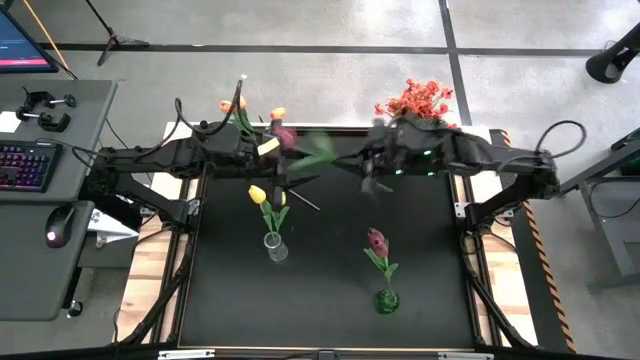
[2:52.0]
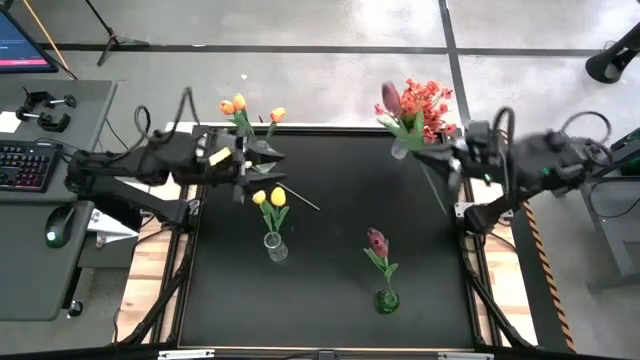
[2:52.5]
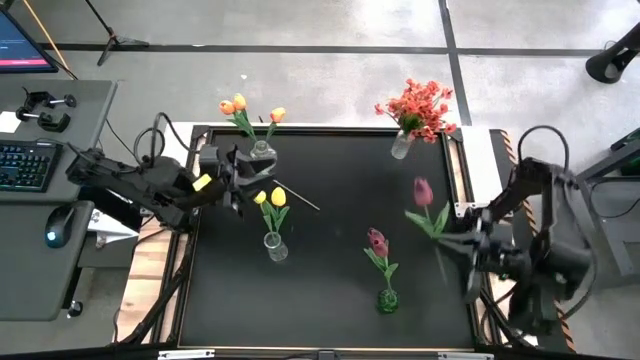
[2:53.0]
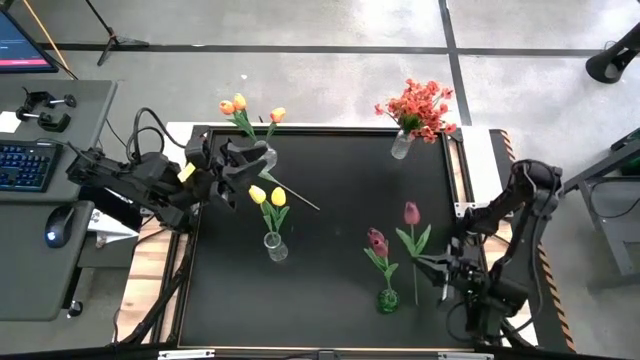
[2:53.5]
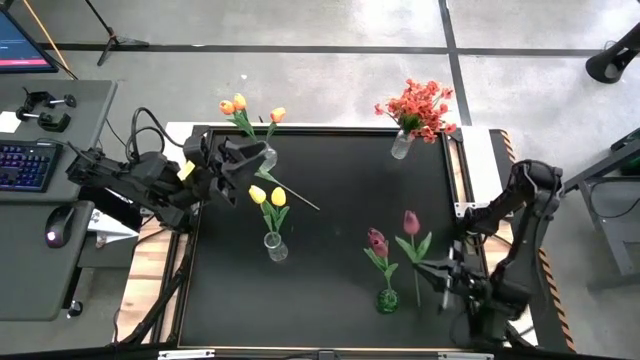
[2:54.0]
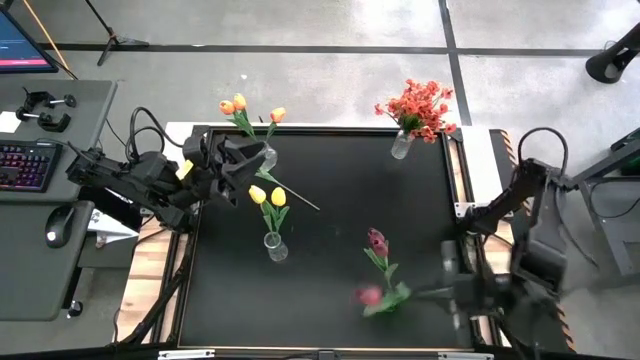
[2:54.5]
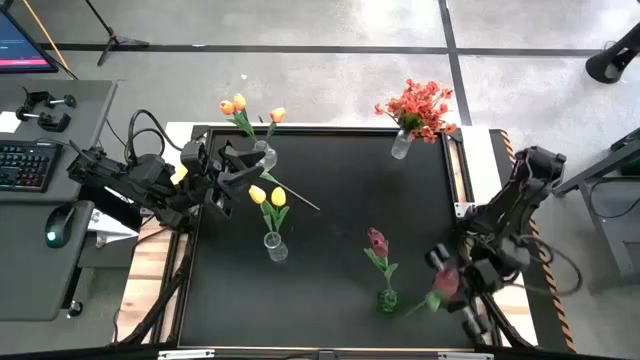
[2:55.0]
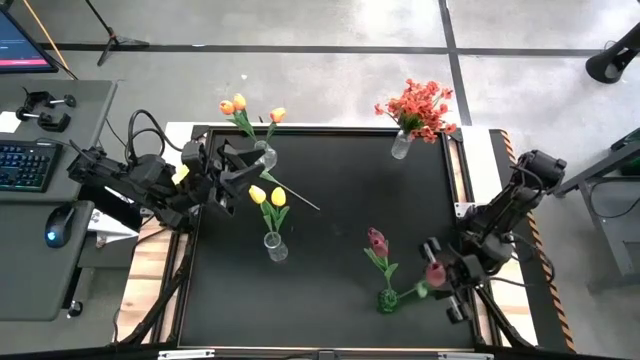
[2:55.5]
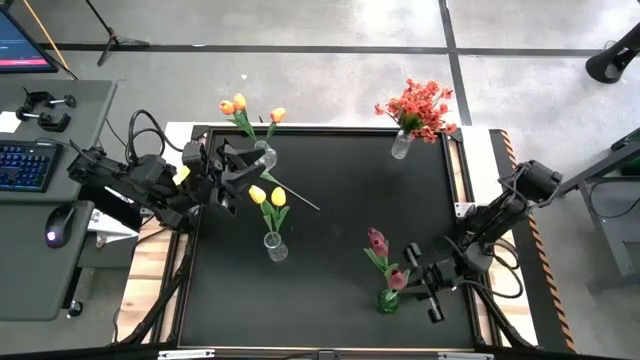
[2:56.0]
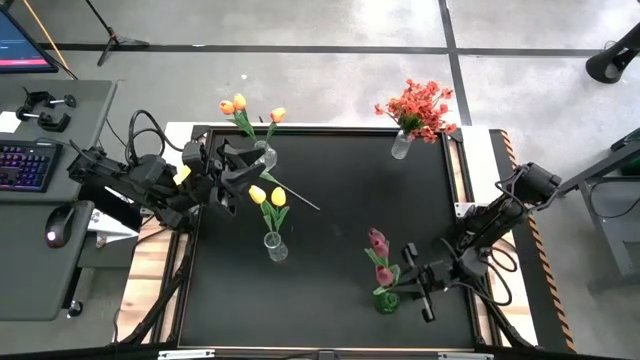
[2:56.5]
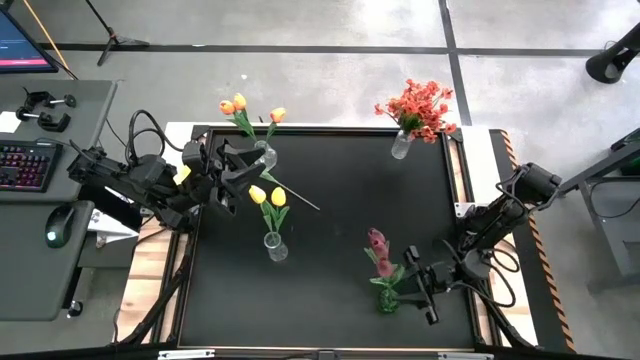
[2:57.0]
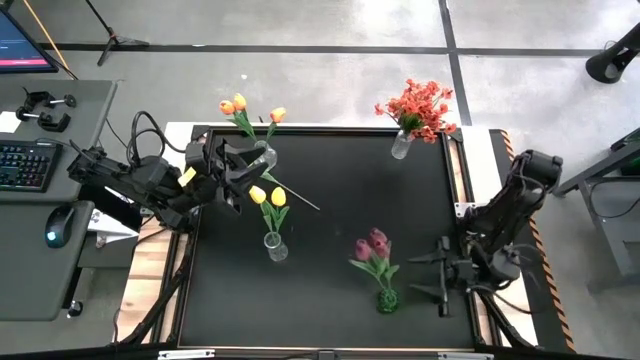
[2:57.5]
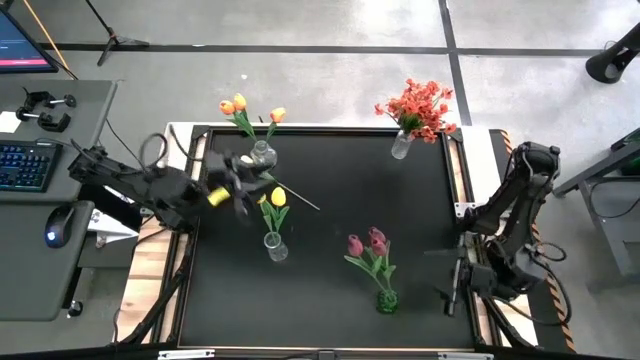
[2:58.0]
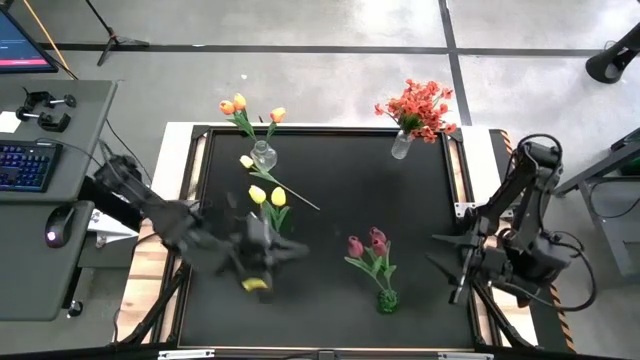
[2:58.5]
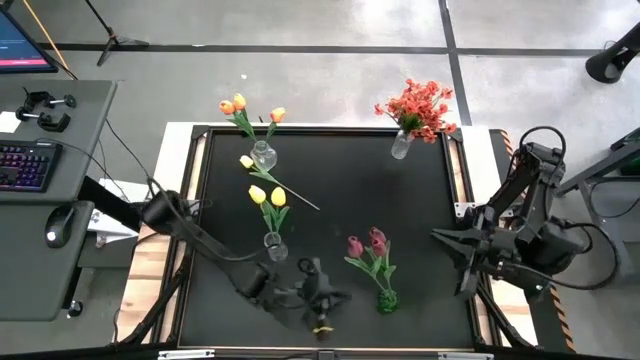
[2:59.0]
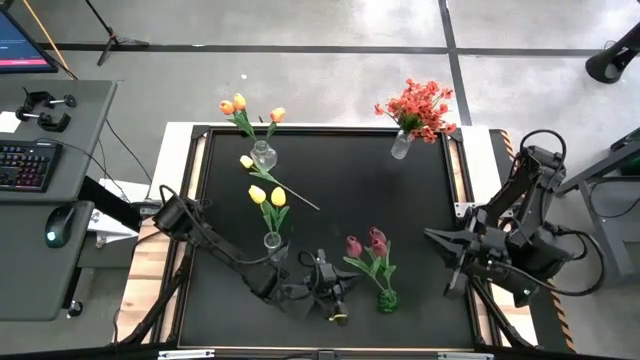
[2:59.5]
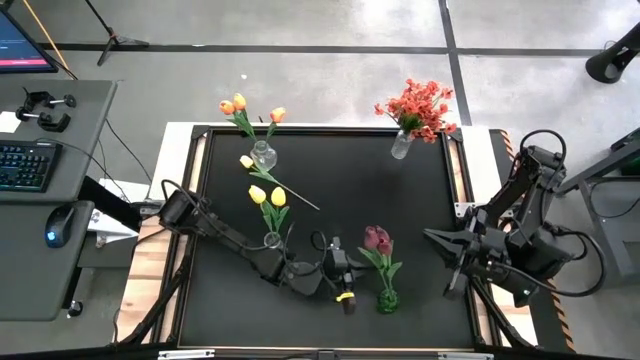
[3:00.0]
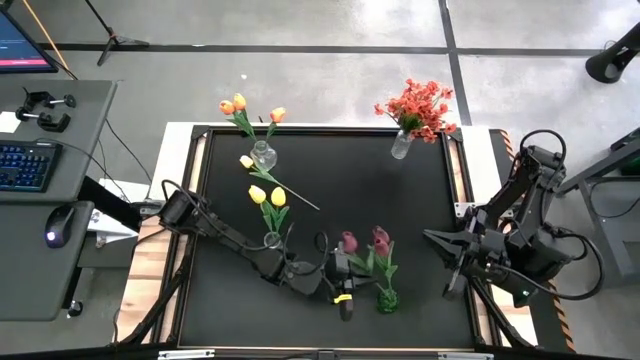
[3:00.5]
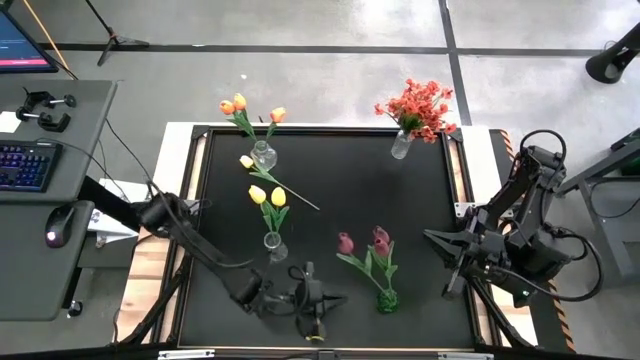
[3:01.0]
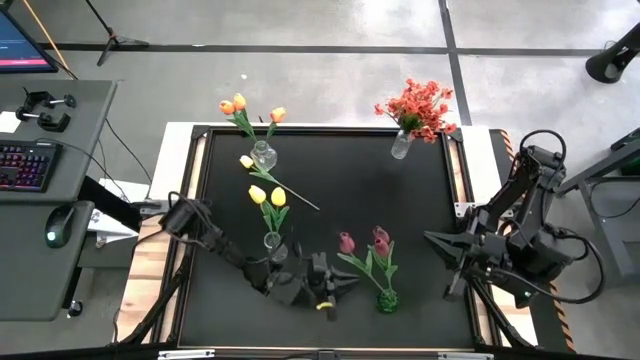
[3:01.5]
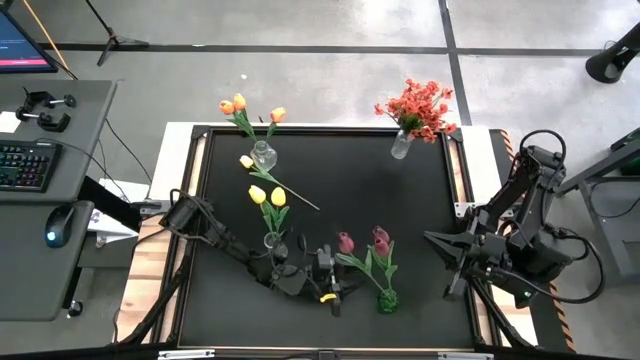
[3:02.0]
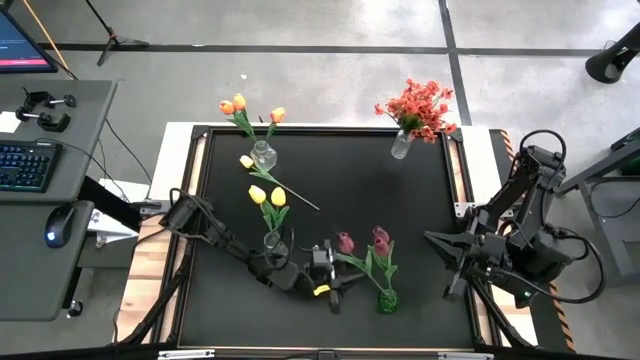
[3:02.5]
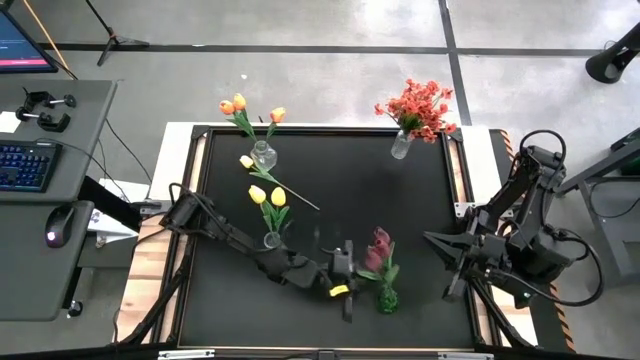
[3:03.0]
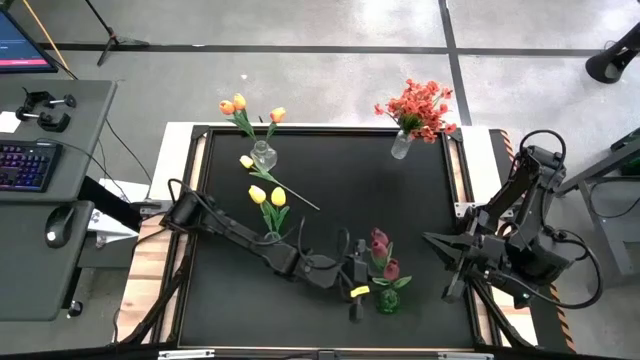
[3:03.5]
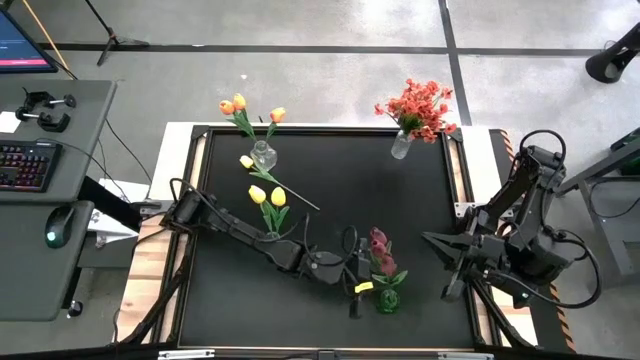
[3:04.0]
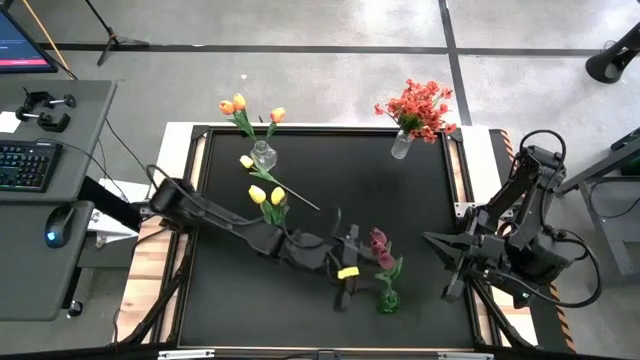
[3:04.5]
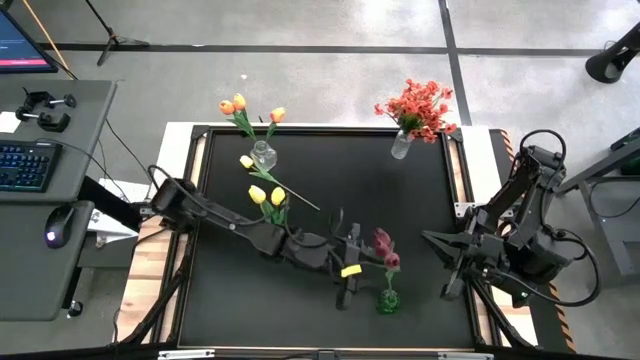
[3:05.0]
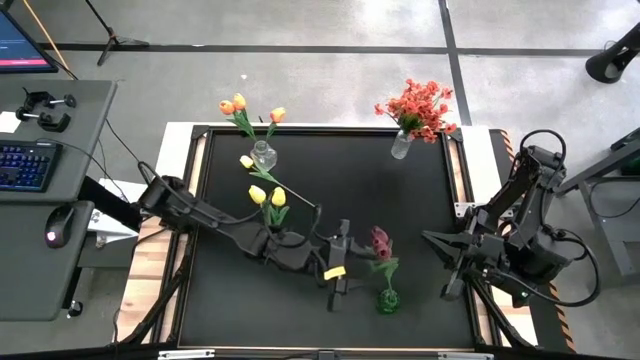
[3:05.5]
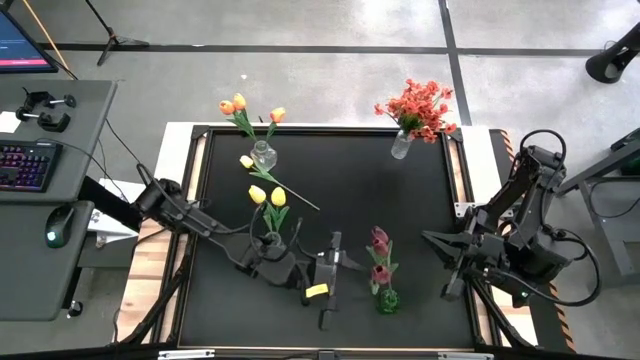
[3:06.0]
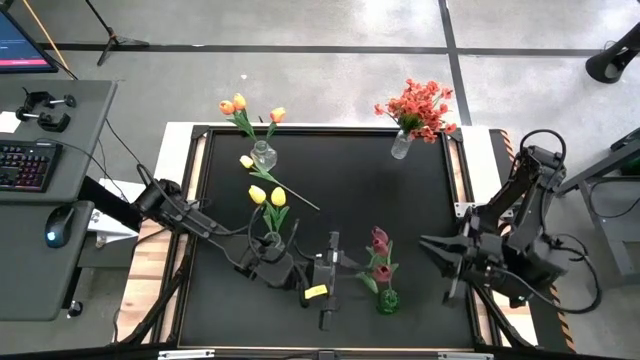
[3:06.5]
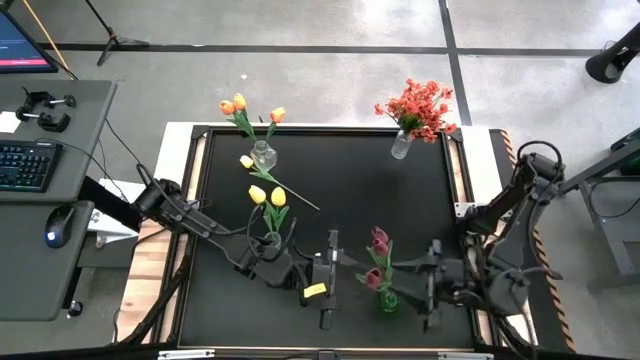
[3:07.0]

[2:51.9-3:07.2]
Task: Sort flowers into vase by color
Put the dark red flower into the green vase
